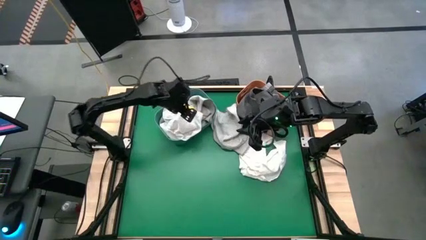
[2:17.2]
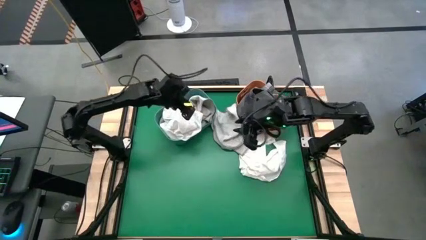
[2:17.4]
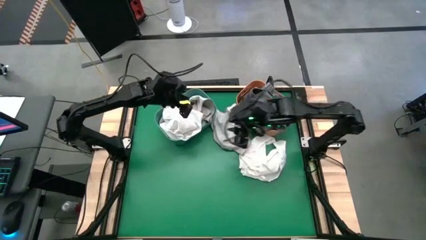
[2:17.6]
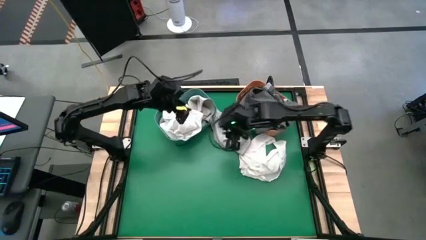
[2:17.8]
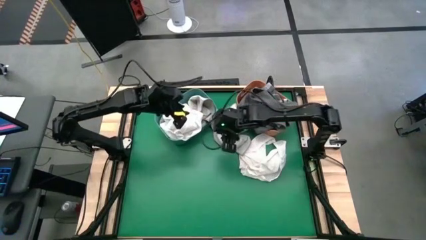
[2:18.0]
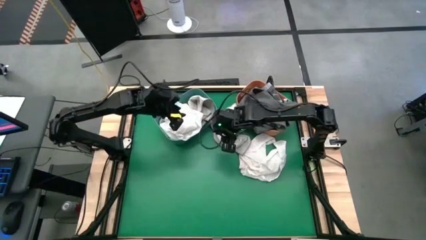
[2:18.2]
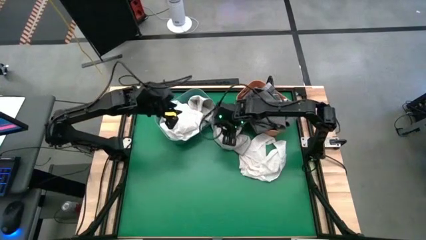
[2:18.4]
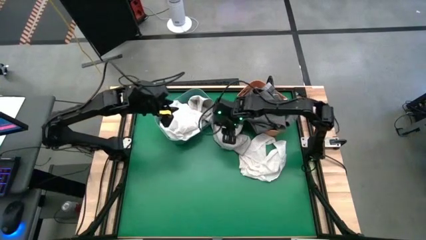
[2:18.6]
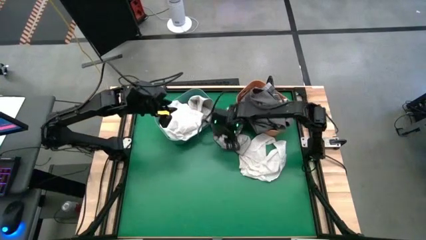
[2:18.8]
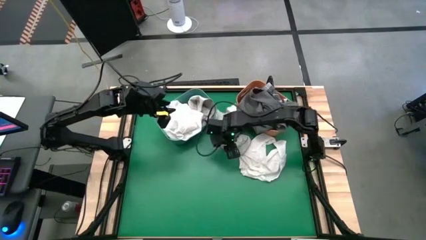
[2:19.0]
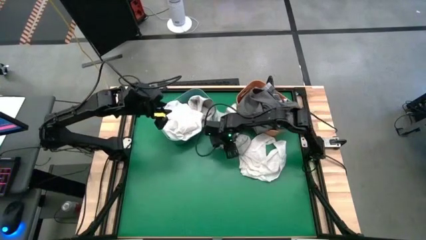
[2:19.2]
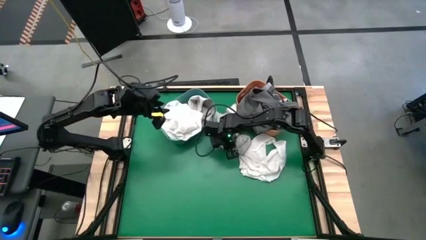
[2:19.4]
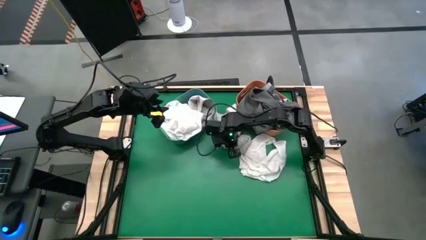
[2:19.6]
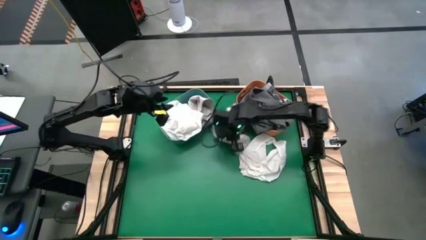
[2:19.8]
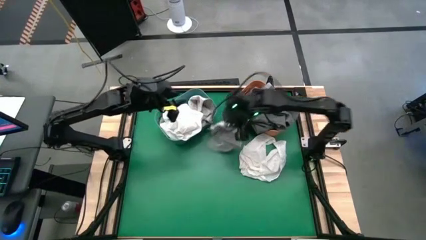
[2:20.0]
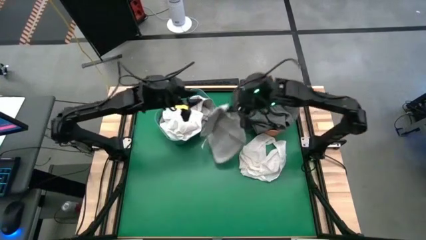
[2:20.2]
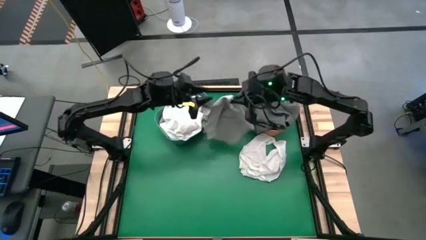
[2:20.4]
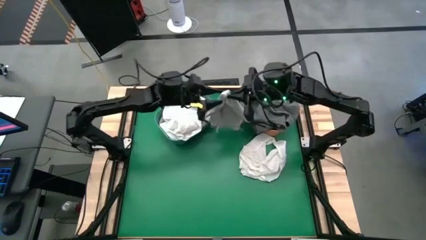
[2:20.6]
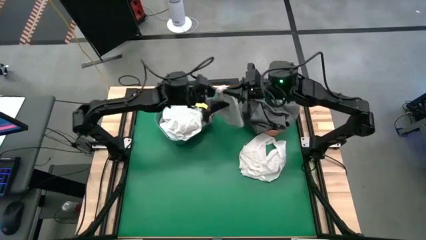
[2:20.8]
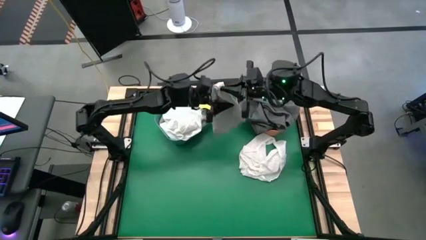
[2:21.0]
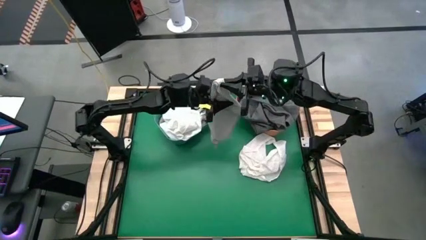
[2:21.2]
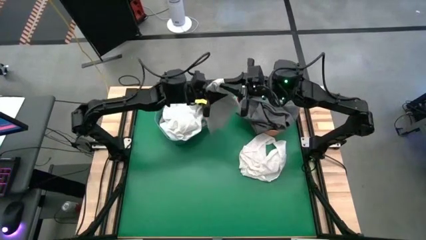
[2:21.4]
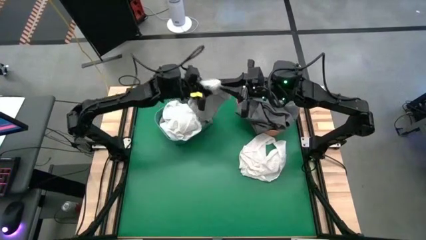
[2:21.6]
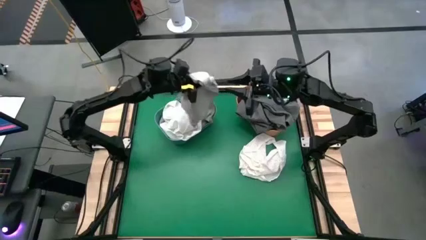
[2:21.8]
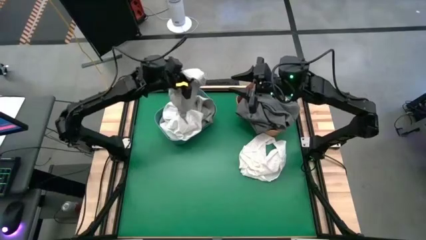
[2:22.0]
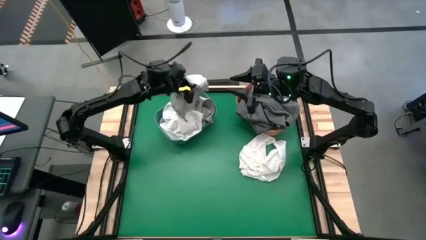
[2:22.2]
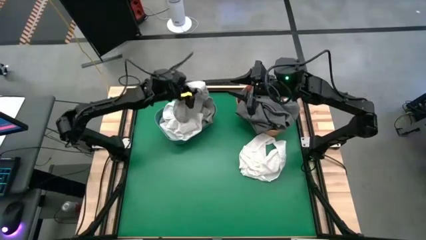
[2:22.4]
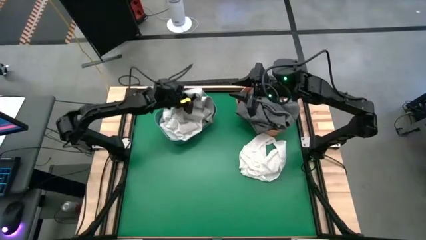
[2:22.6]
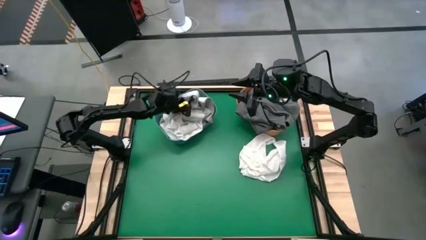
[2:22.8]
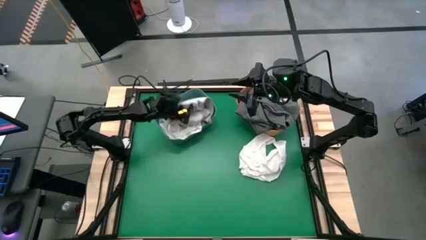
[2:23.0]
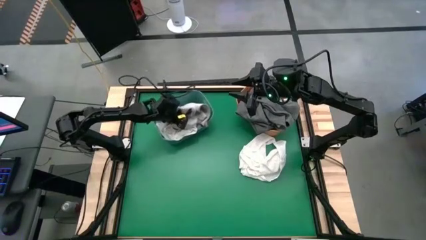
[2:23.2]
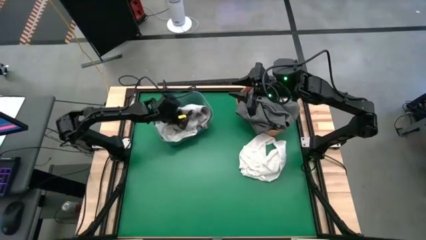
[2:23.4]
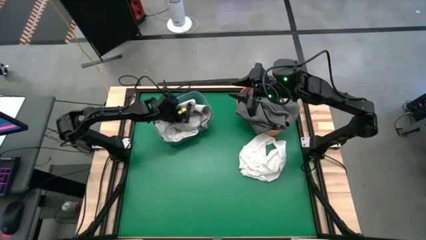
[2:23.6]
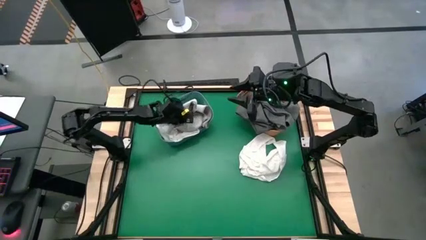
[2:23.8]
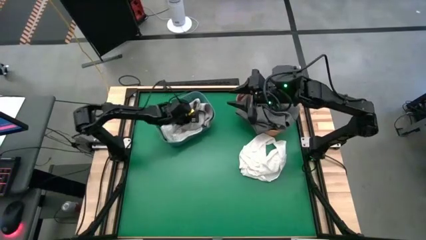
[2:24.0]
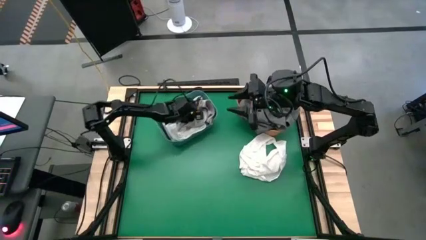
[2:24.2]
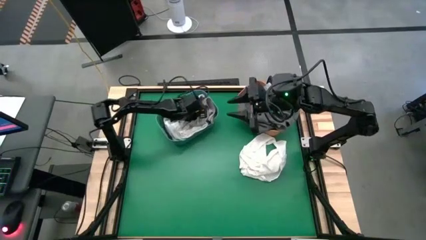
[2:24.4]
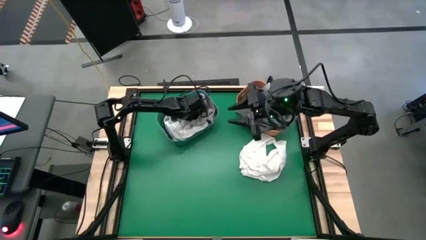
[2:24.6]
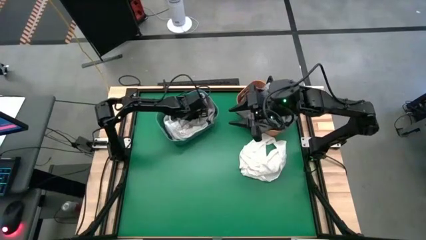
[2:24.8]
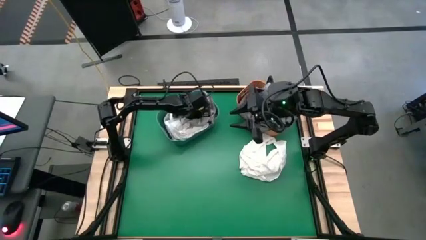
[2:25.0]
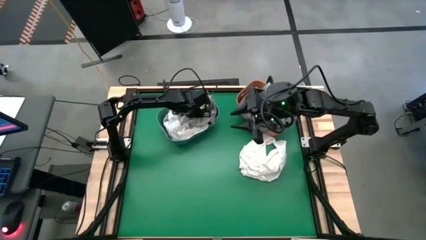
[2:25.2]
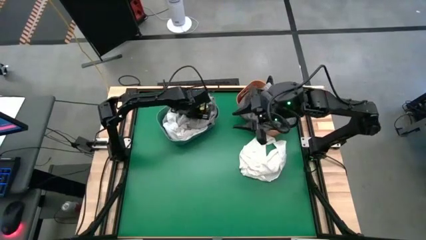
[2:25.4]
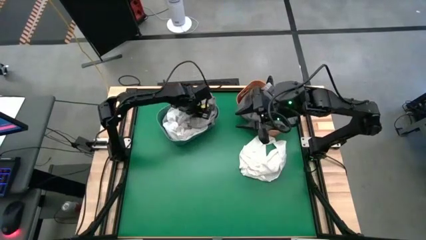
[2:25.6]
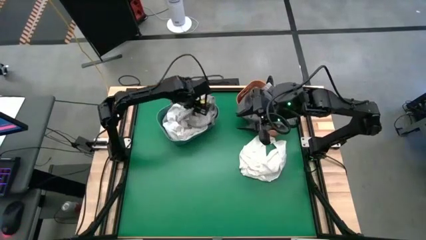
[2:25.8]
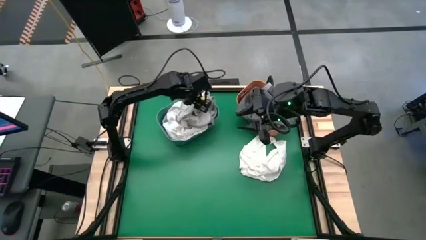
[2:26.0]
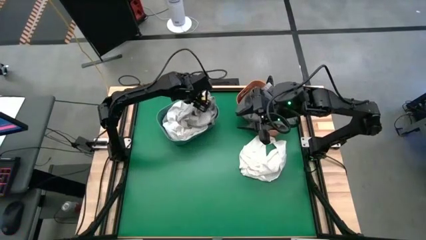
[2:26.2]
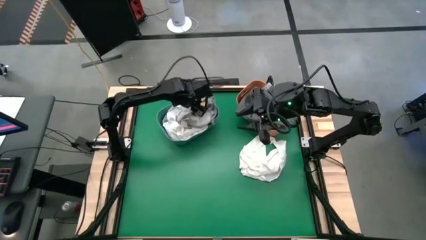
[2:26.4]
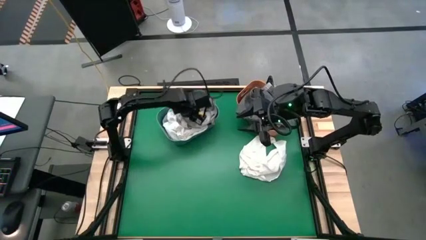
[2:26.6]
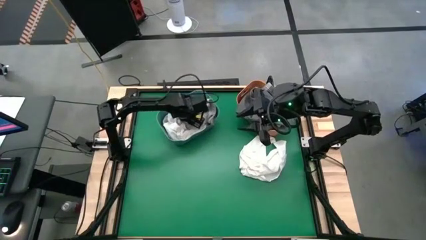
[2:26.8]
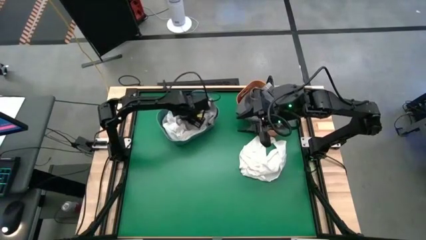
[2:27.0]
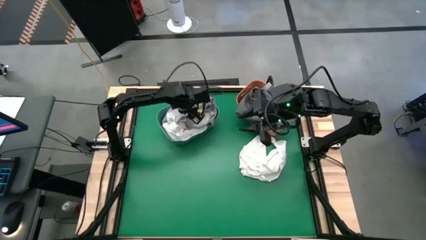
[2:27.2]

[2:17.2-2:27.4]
Task: Sort towels by color in basket
Put the gray towel into the blue bin

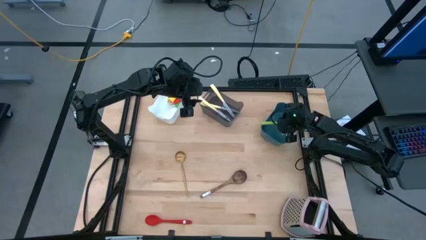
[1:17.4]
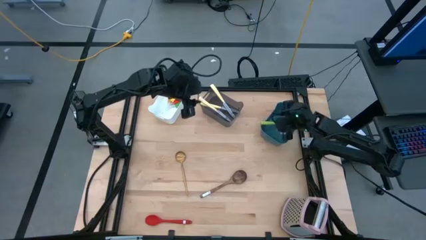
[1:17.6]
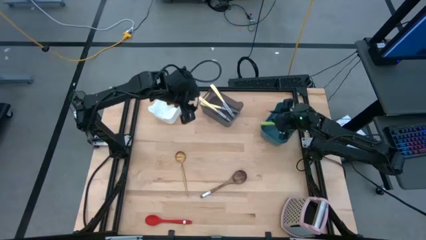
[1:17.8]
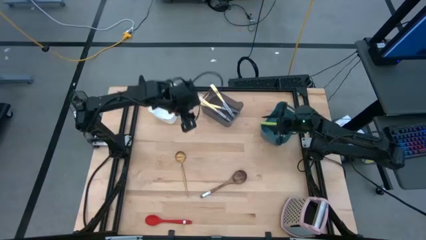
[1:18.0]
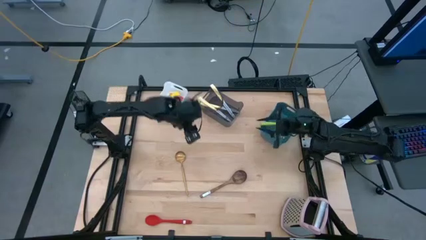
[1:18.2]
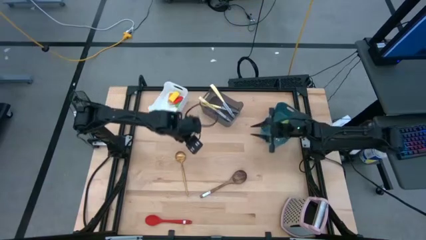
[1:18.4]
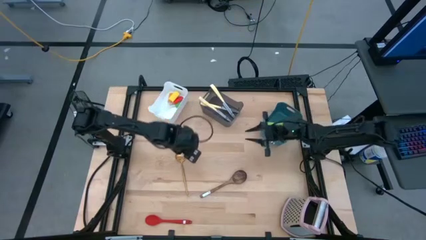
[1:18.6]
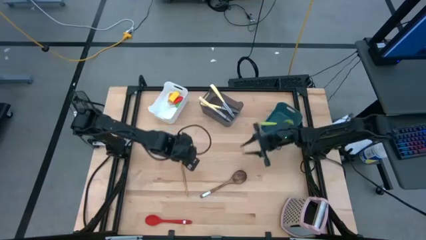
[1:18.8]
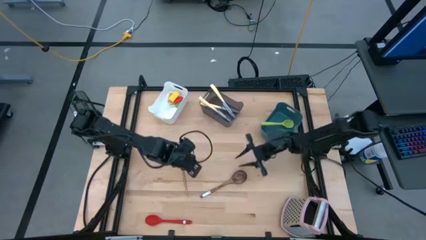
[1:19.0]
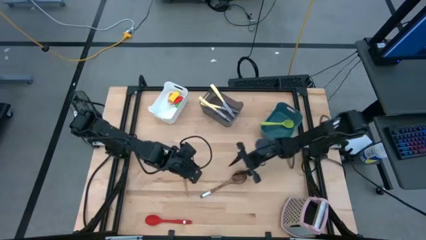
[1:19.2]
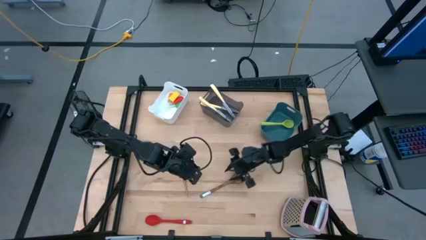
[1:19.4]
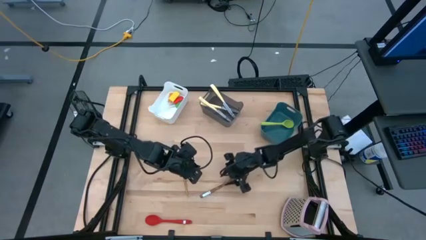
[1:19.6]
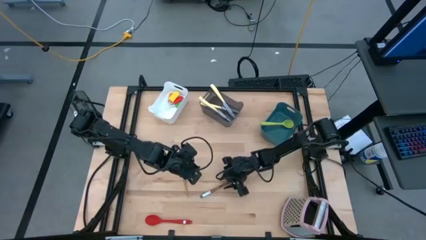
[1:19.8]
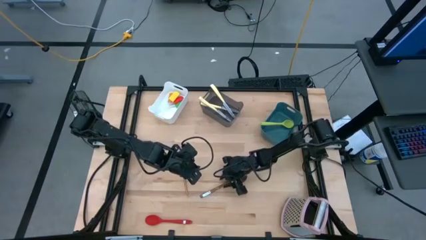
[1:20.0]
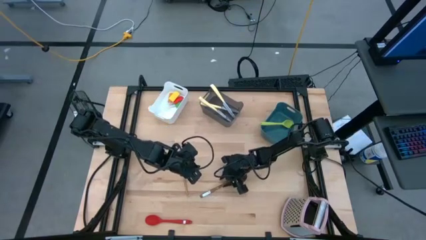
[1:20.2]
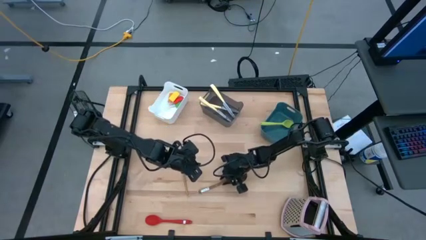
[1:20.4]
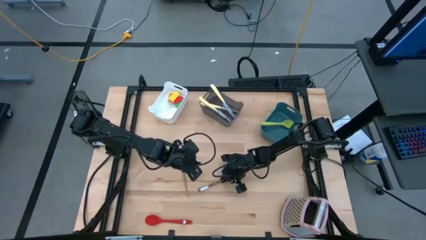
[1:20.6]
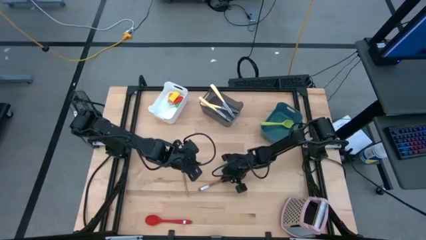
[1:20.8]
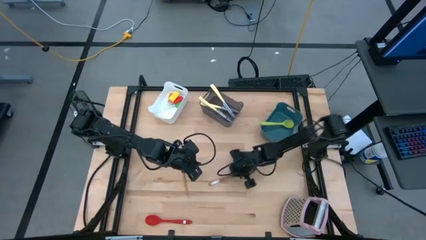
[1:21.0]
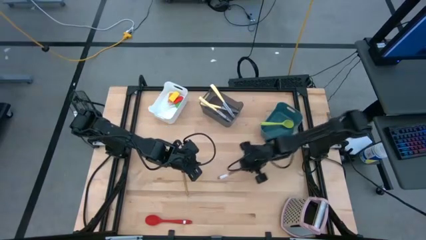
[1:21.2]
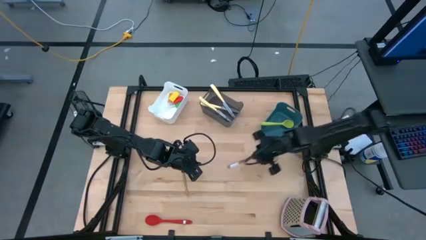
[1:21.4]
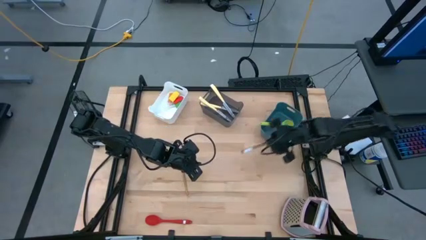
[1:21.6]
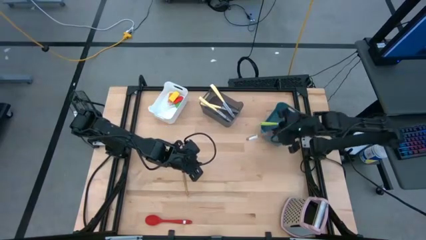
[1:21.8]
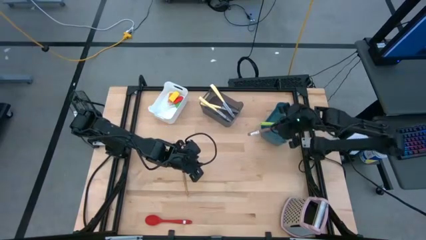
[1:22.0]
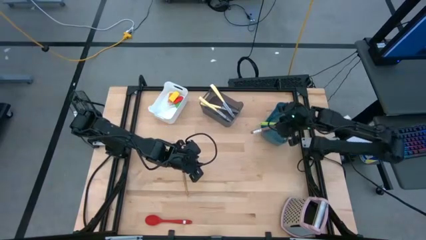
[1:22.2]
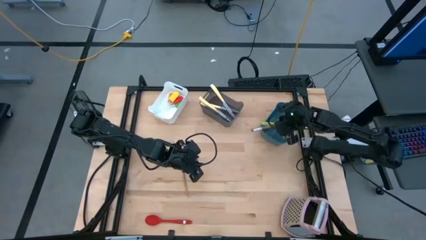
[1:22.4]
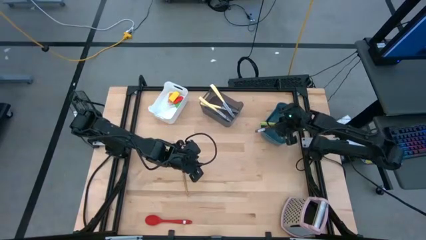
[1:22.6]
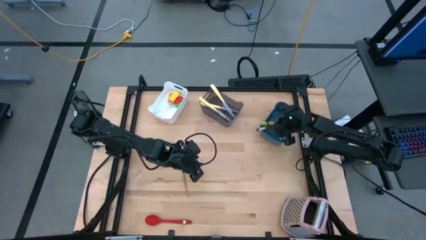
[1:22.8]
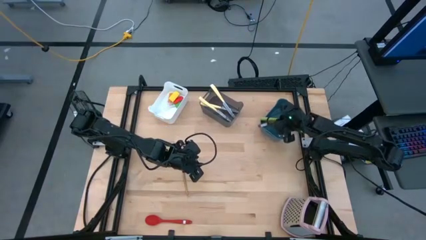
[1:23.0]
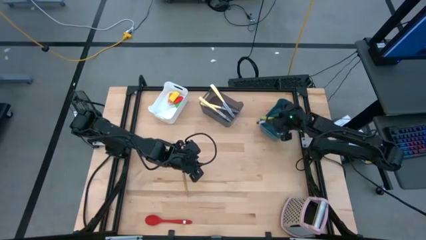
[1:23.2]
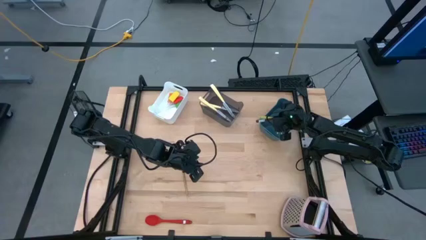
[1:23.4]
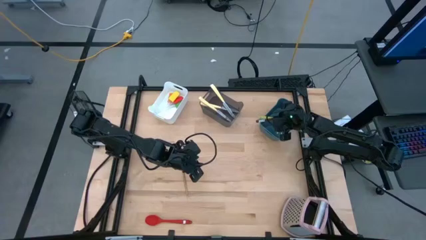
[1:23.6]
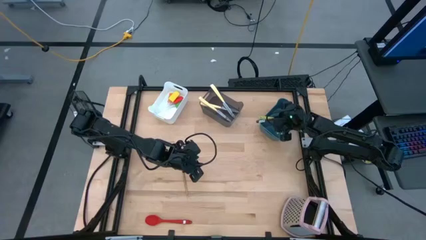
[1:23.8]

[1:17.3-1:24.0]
Task: Pick & Place Kitchen Items
Put the brown serving spoon into the blue bin
